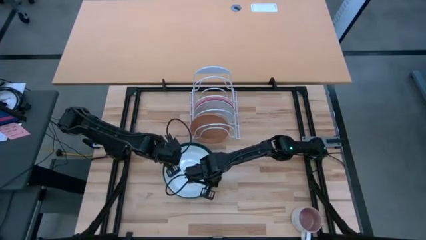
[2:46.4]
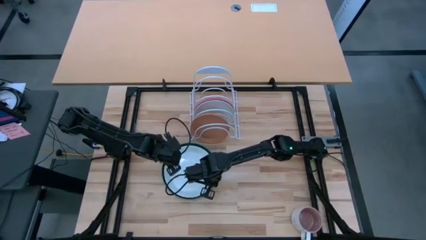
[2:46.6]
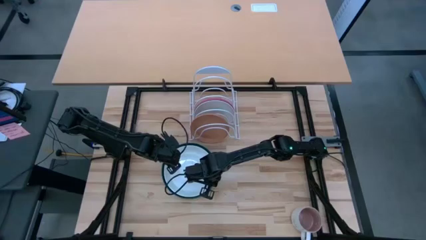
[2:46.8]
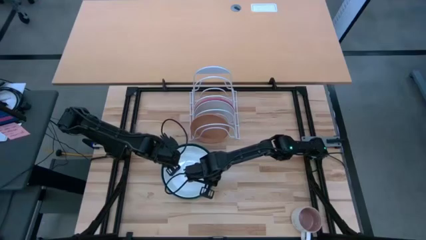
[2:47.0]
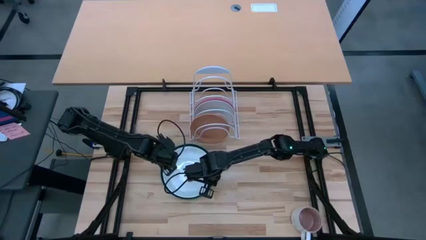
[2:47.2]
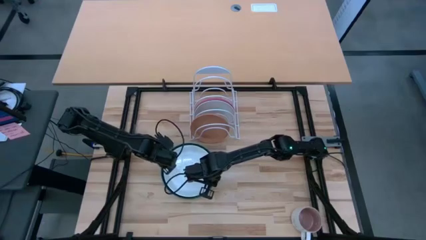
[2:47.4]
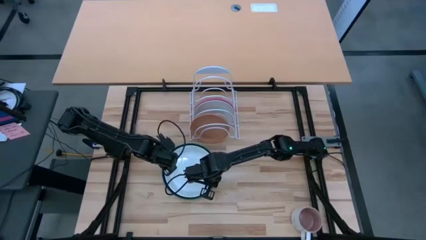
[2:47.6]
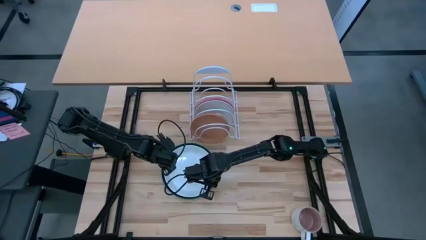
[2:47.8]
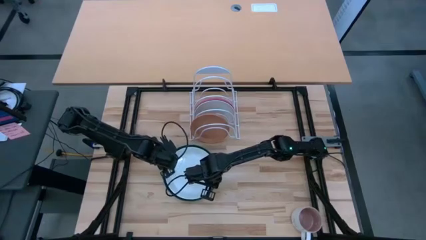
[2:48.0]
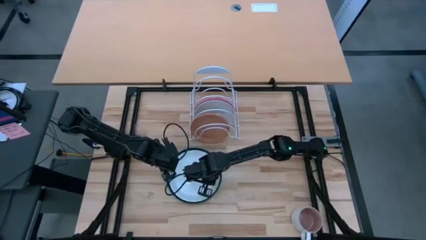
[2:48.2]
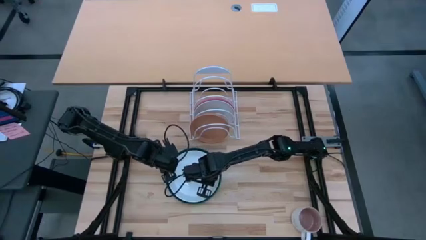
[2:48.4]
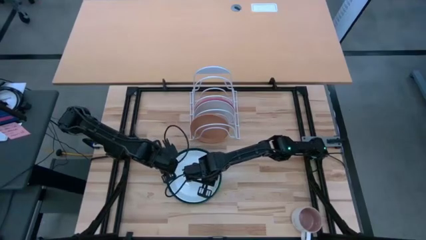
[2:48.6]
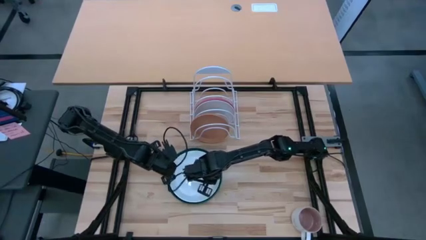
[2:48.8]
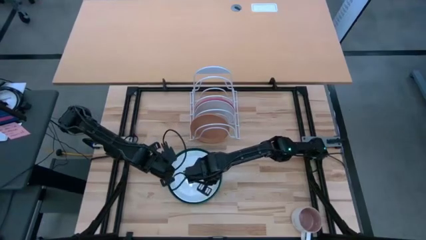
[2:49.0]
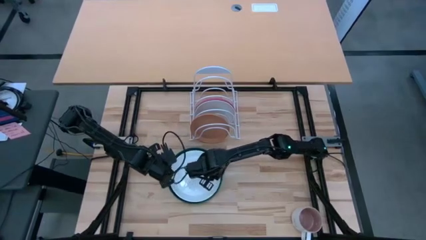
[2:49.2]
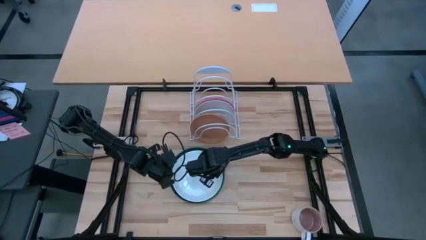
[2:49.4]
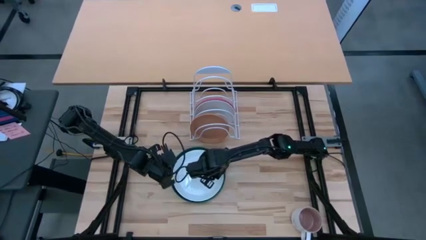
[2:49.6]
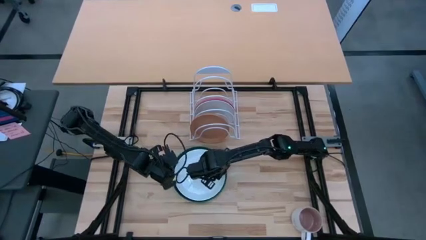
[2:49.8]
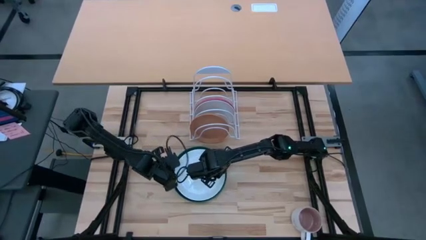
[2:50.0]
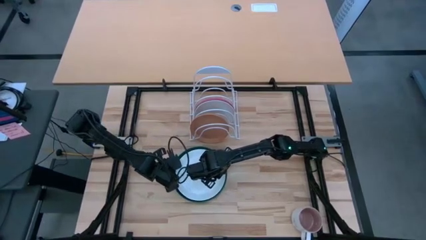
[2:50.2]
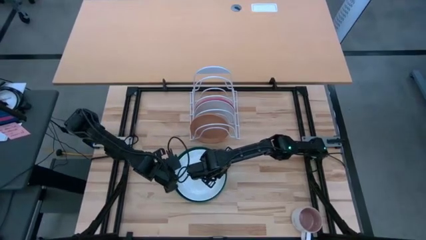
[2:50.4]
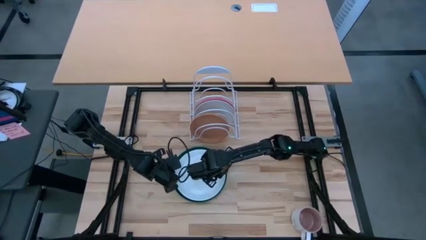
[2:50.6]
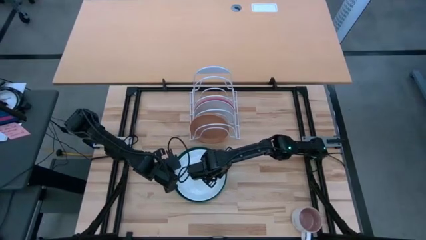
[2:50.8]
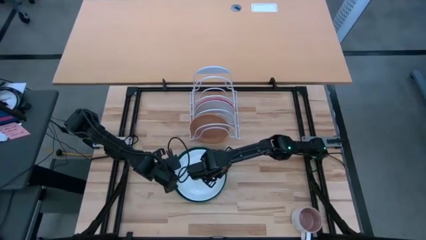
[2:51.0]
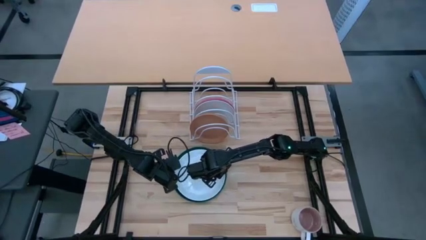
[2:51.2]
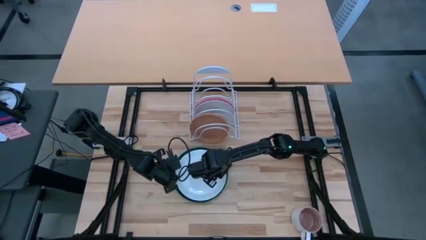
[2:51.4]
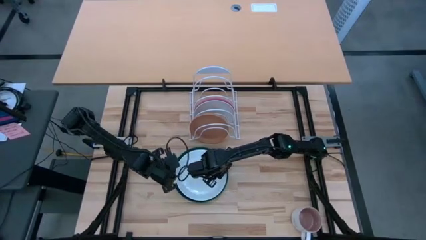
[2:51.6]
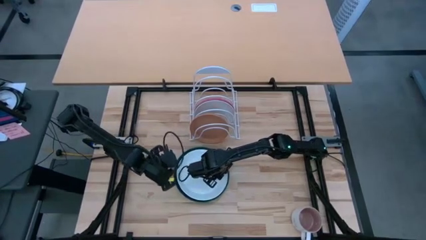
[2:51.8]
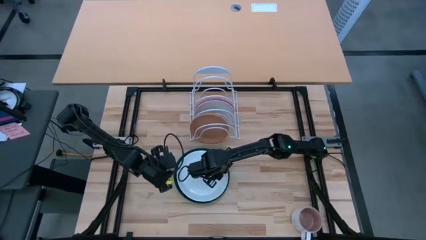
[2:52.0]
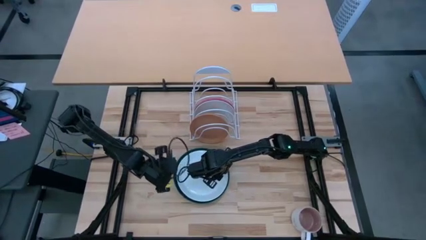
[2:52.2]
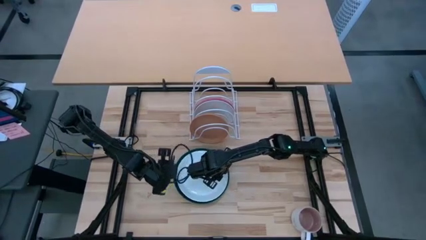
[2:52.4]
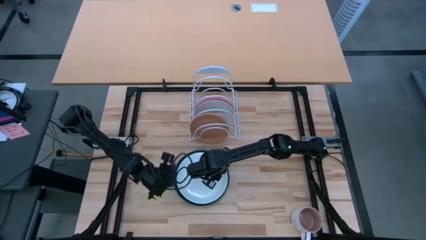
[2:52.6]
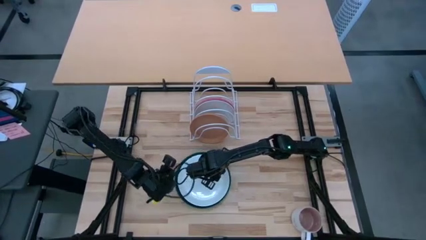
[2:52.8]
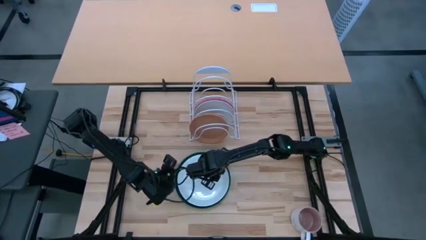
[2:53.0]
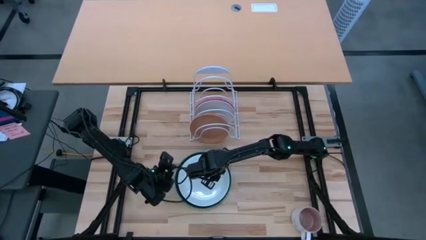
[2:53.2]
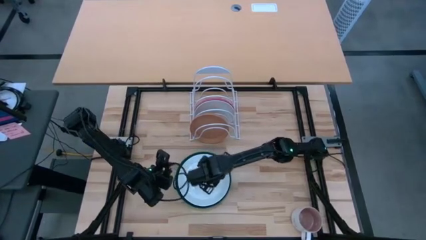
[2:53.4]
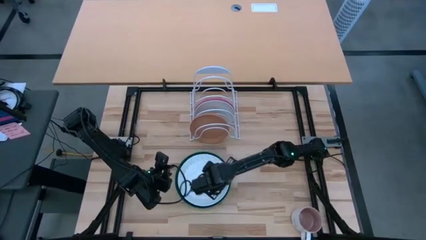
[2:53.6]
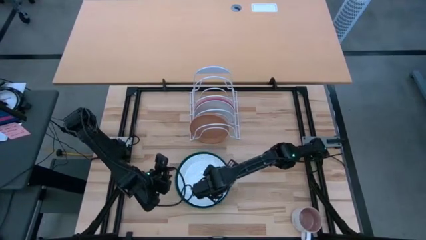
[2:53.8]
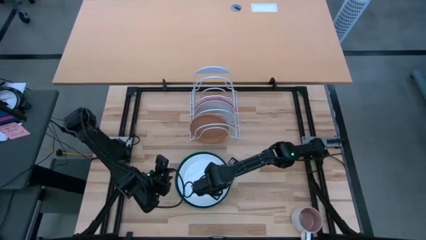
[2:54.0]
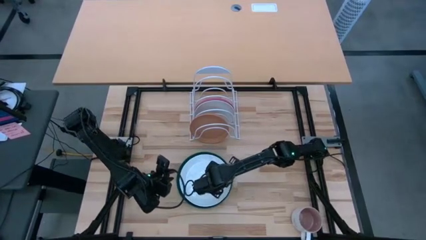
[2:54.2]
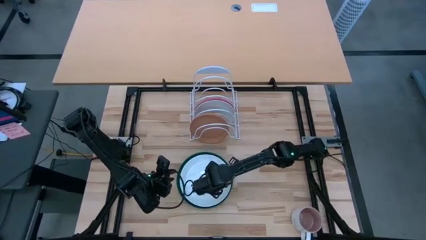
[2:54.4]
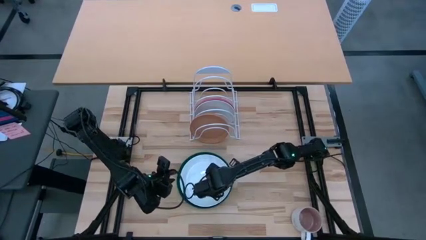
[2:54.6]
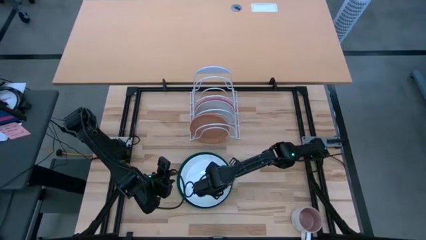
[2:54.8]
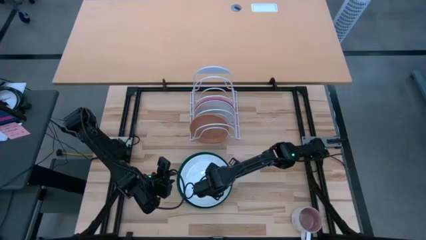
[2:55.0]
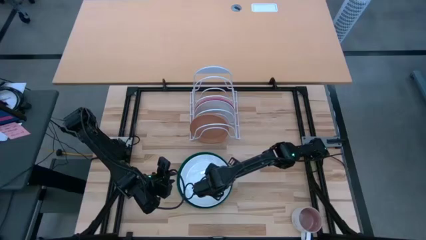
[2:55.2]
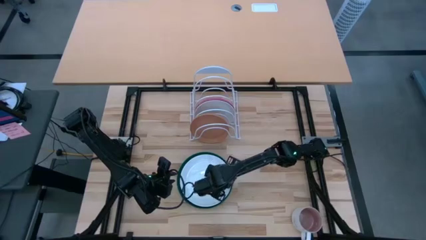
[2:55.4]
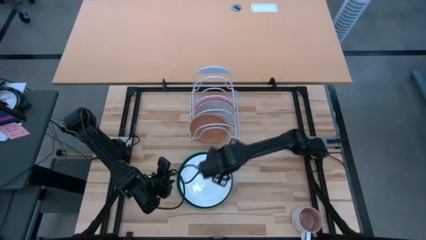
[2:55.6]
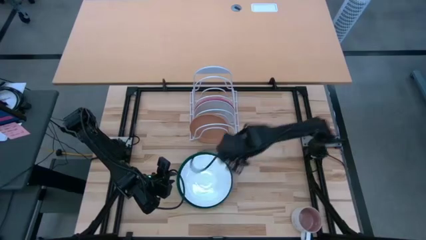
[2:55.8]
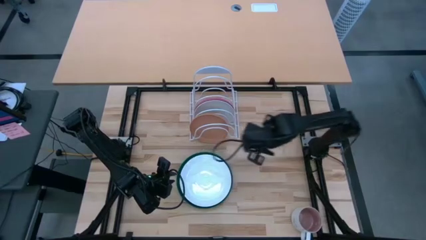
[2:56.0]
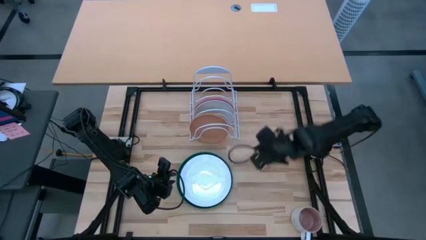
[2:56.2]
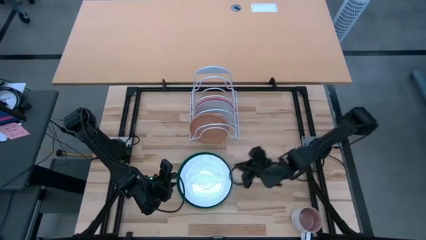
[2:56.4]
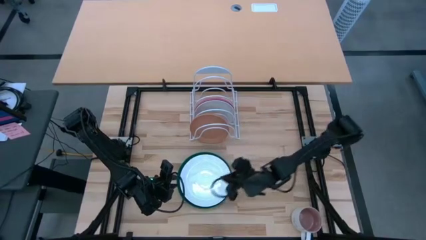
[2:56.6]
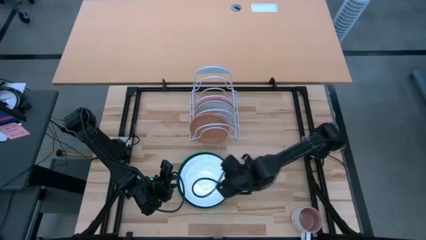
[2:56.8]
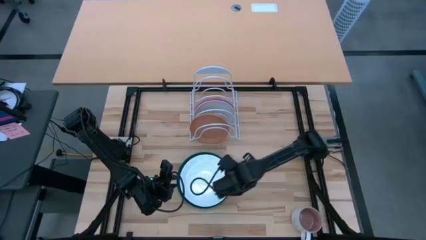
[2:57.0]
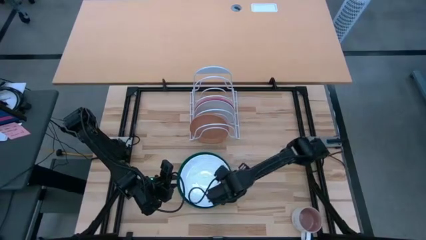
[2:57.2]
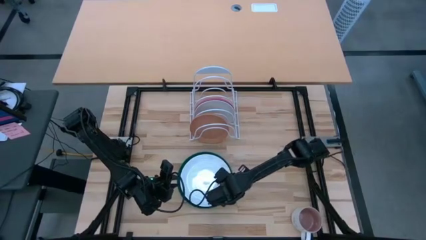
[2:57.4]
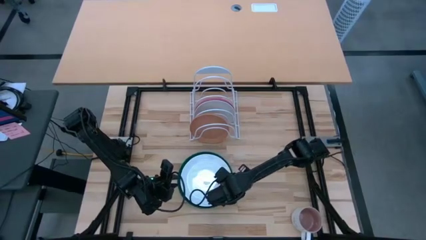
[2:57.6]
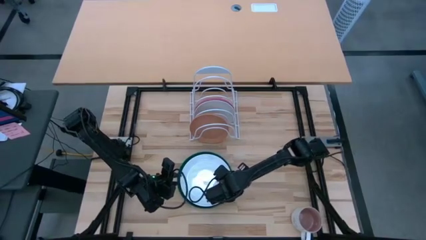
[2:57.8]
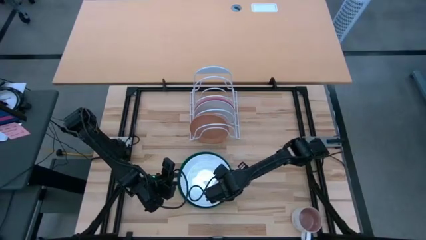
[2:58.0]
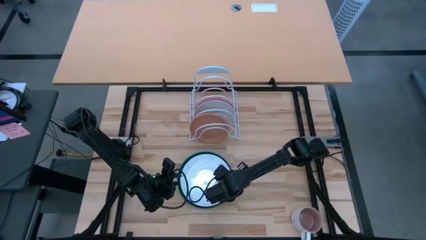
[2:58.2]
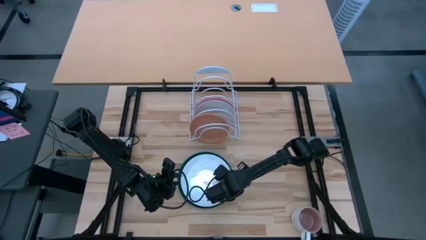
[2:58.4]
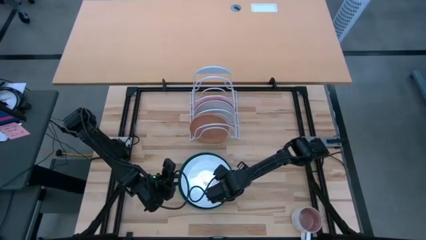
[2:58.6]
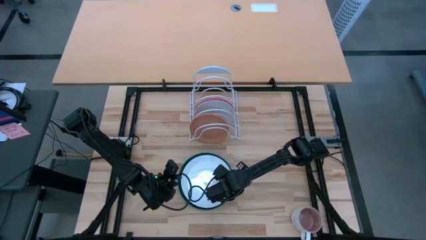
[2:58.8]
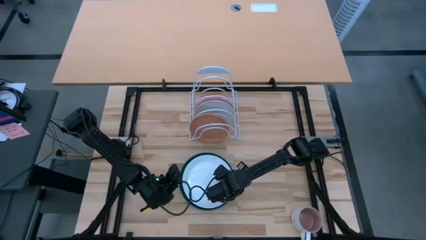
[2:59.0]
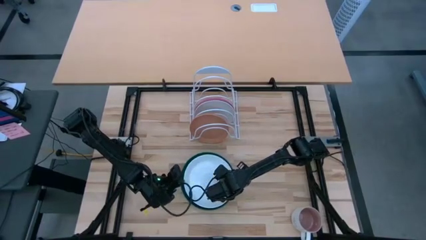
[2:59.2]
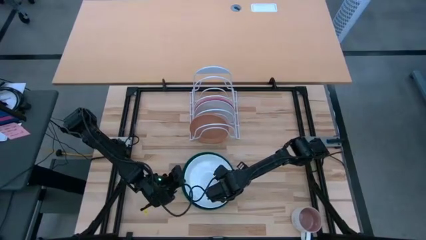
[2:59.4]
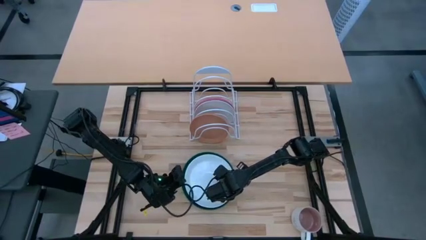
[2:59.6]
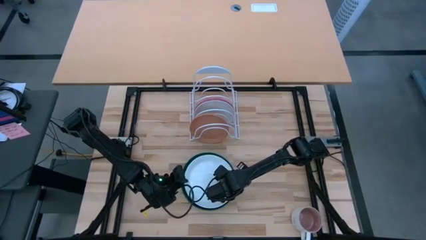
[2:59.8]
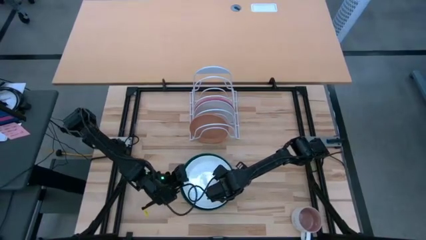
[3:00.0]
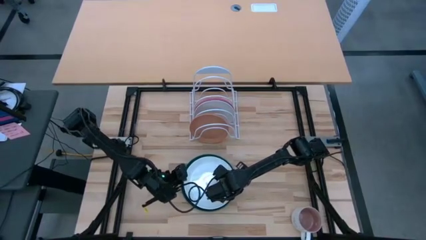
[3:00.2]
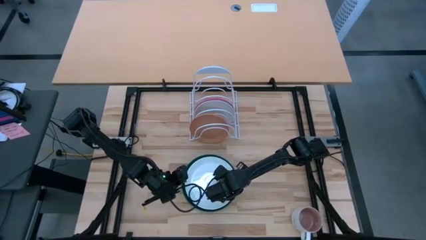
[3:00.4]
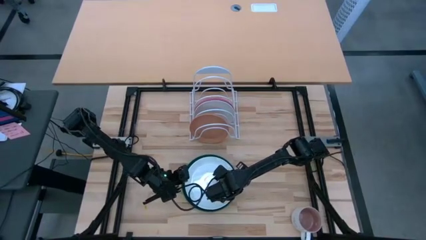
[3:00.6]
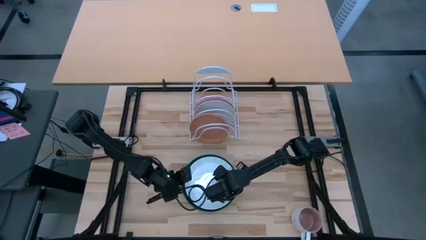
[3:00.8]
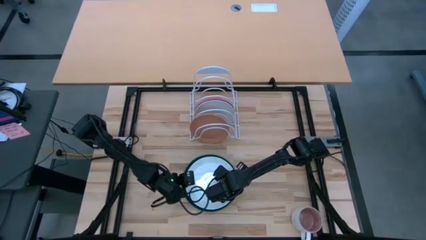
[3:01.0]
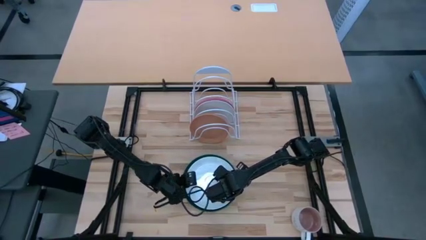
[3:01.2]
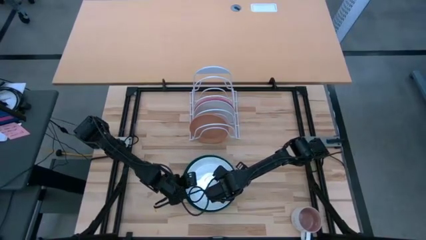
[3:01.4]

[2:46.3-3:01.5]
Task: Sort dishes
Put the white plate on the dish rack
